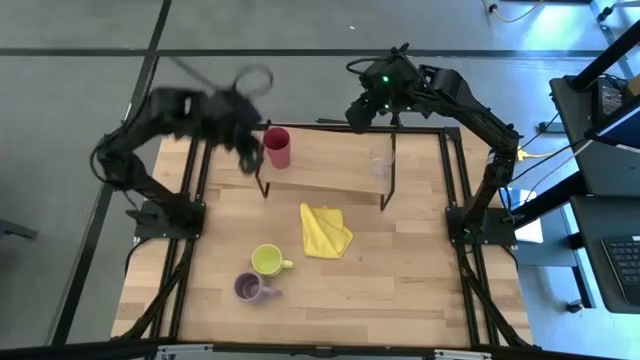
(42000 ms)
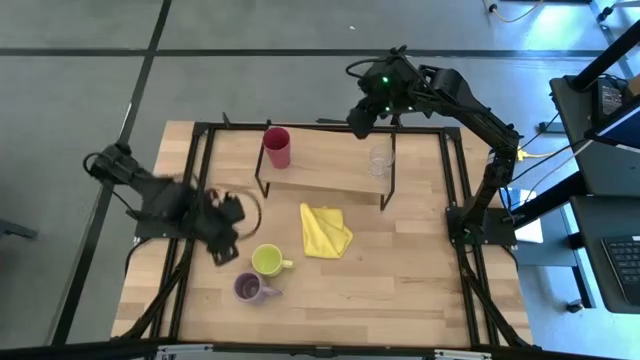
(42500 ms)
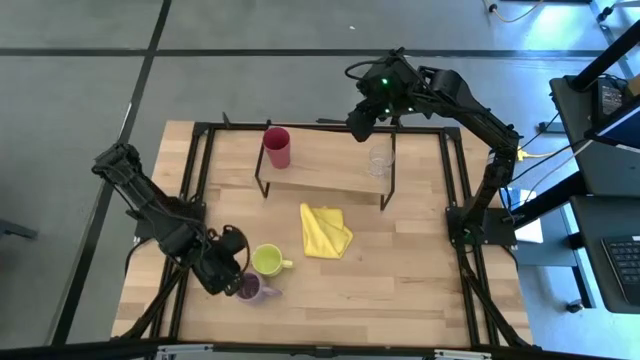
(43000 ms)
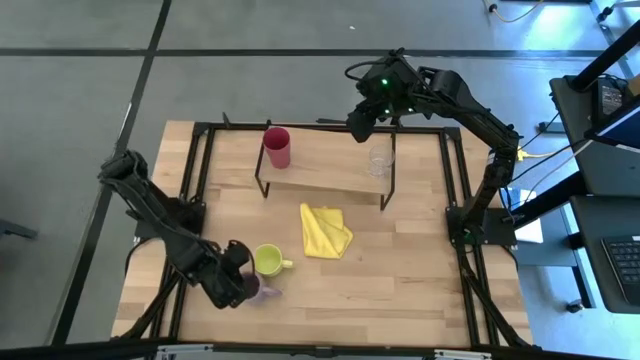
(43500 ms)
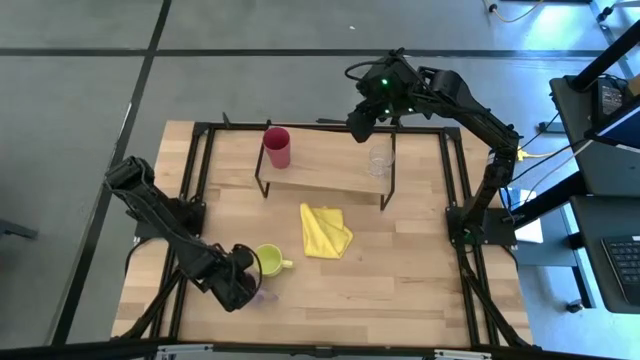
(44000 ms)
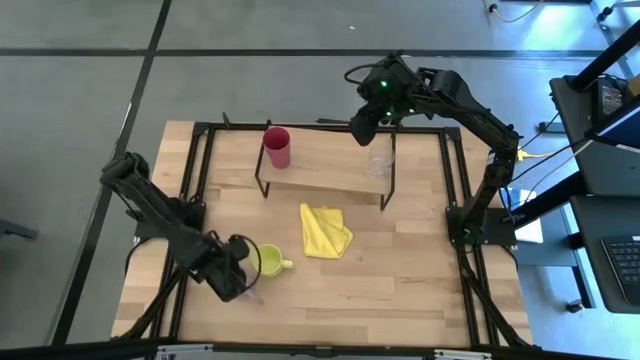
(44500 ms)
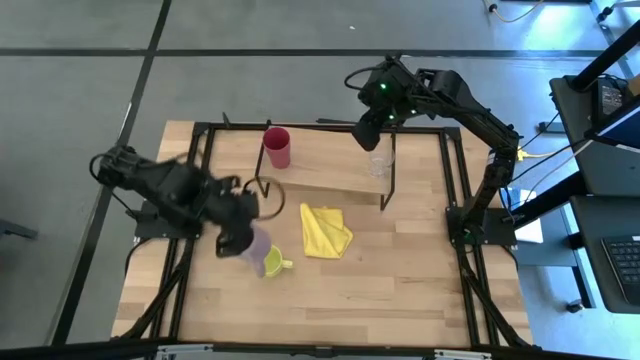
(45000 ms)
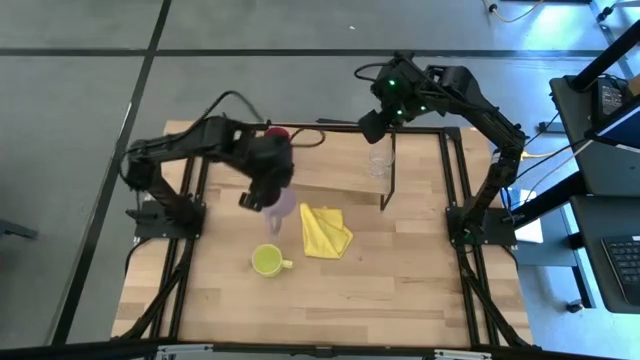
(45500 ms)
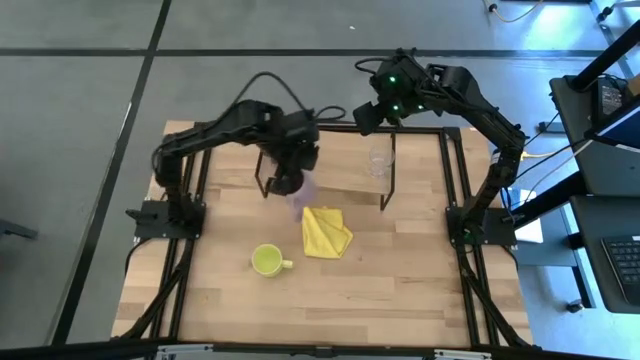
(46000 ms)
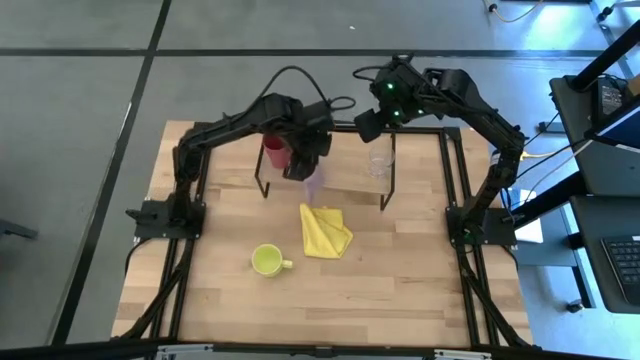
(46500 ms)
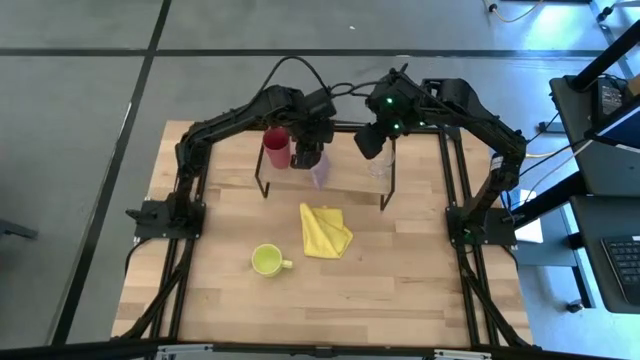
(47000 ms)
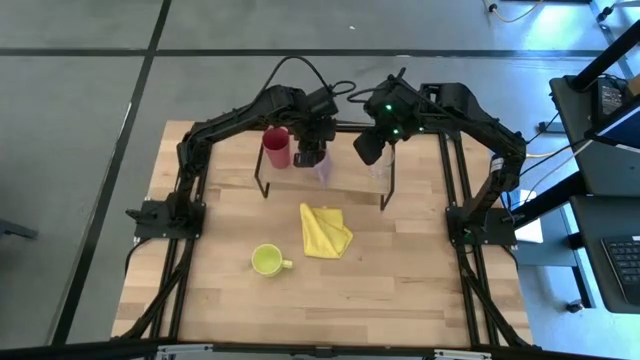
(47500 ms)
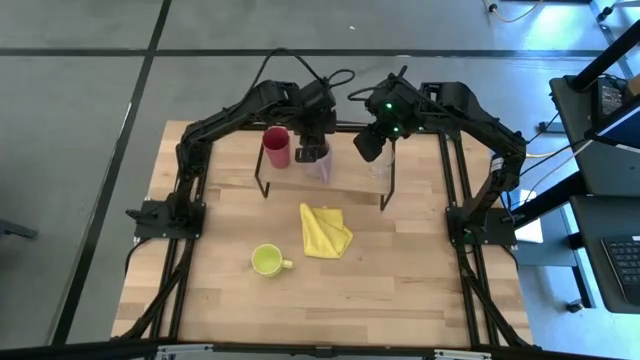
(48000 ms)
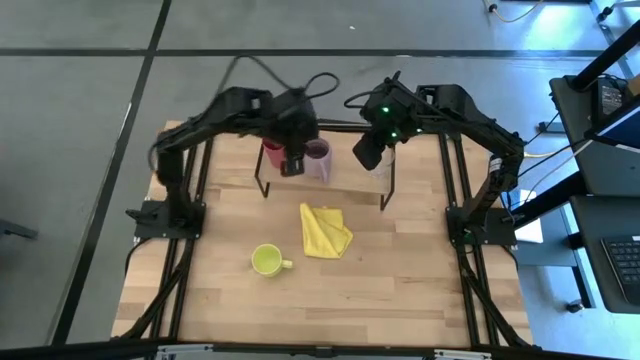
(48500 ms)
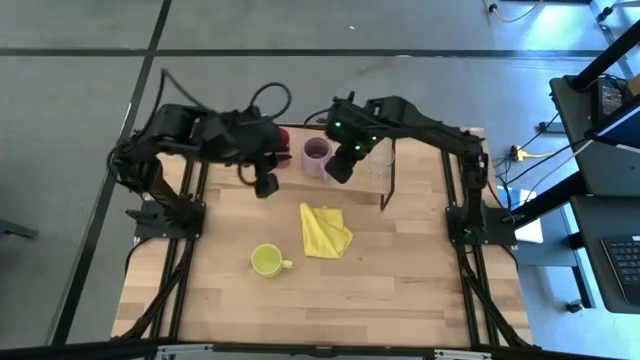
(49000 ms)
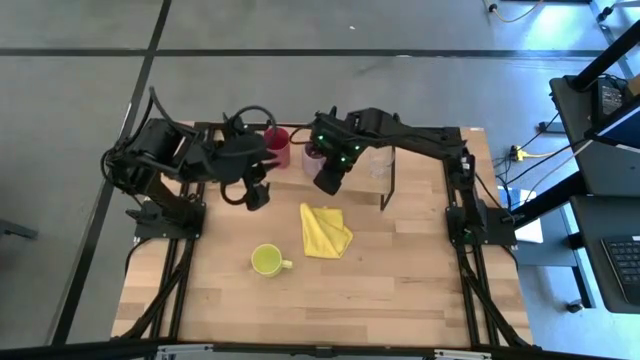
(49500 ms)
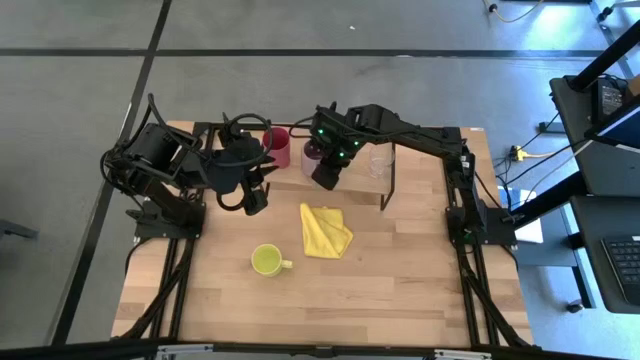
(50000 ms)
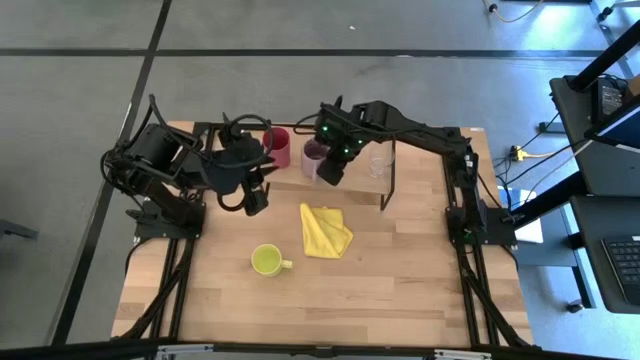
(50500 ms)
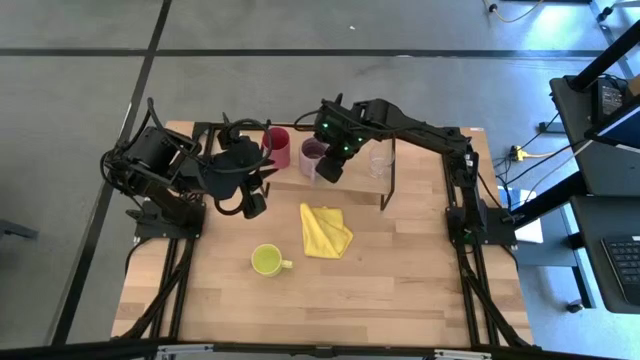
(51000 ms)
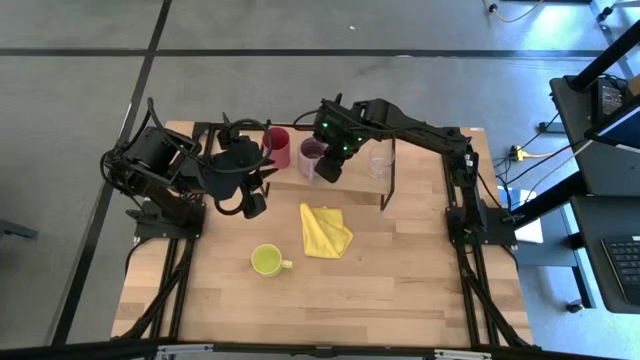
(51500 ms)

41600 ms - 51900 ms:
Task: Stack small to large cups/mugs on shelf
Put the purple mug near the pink cup on the shelf

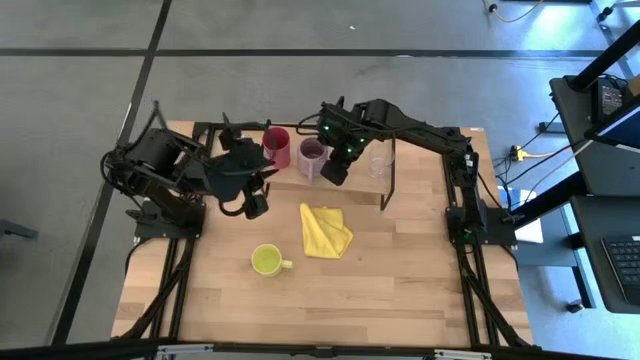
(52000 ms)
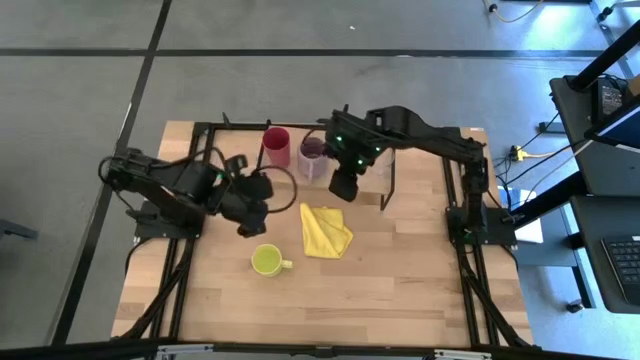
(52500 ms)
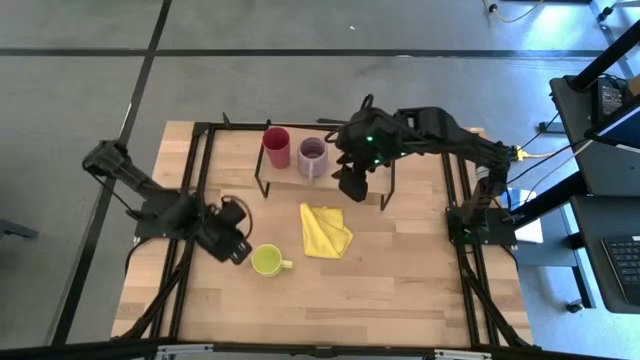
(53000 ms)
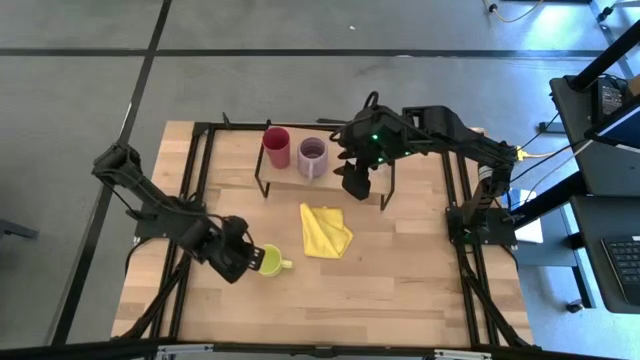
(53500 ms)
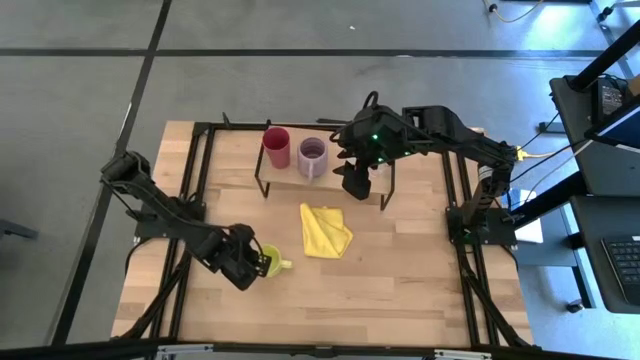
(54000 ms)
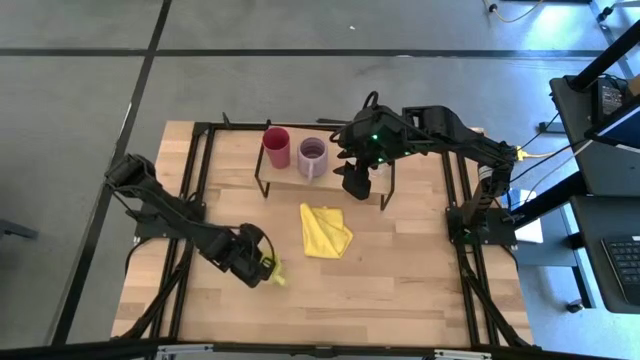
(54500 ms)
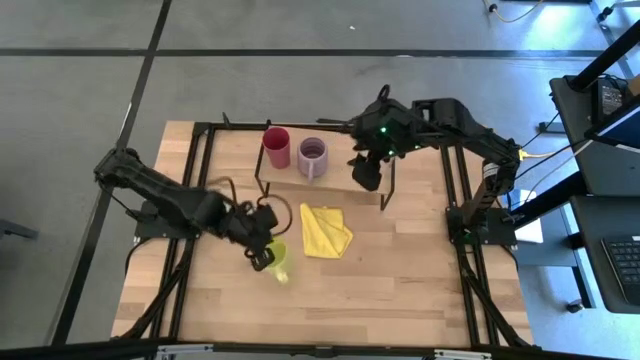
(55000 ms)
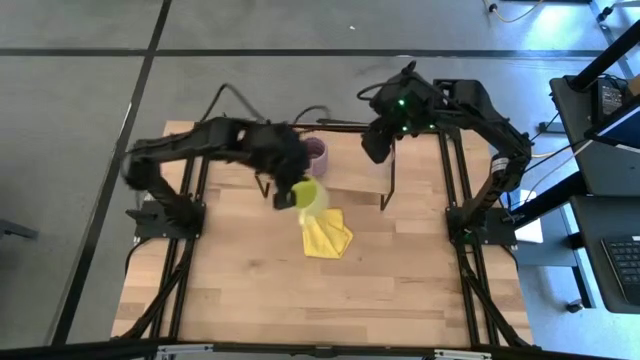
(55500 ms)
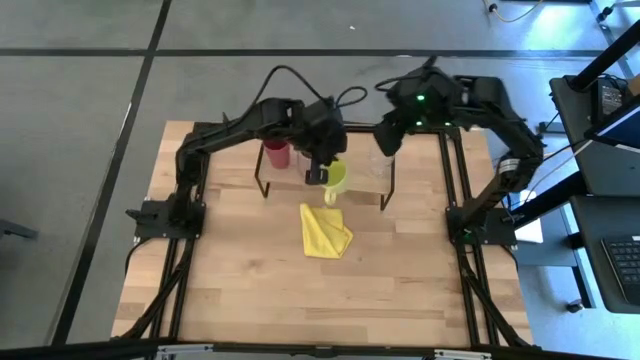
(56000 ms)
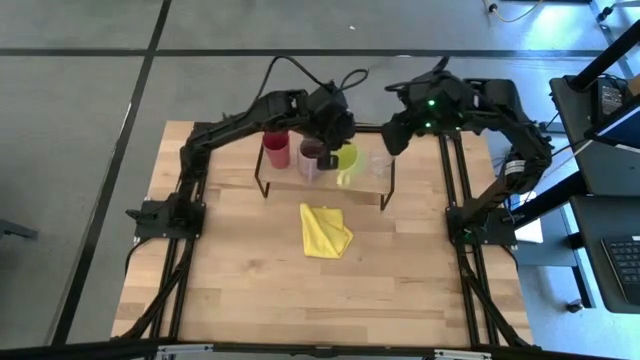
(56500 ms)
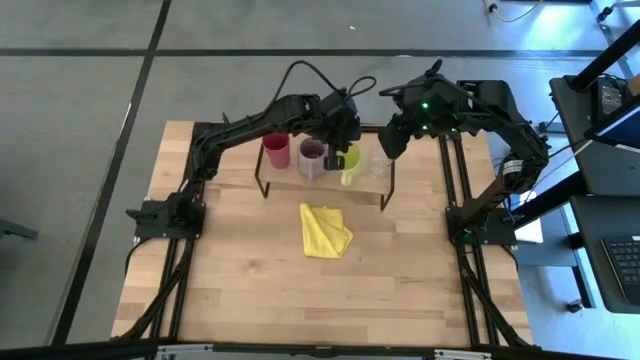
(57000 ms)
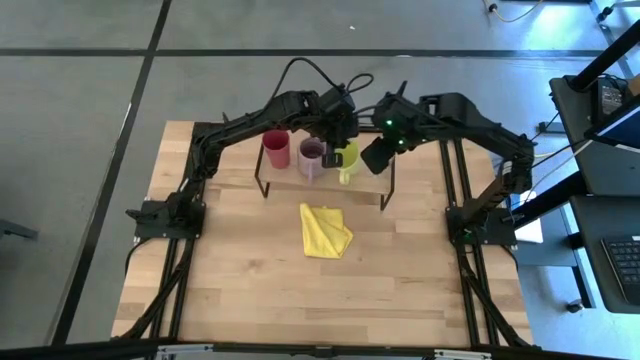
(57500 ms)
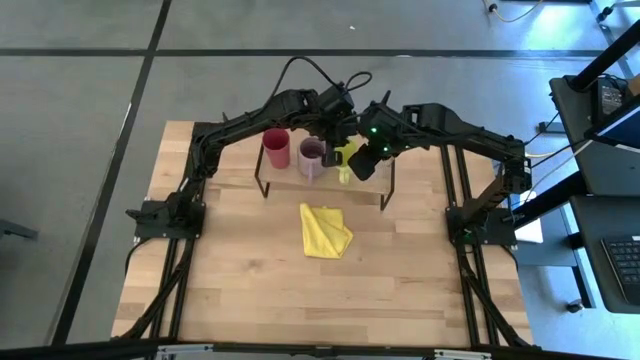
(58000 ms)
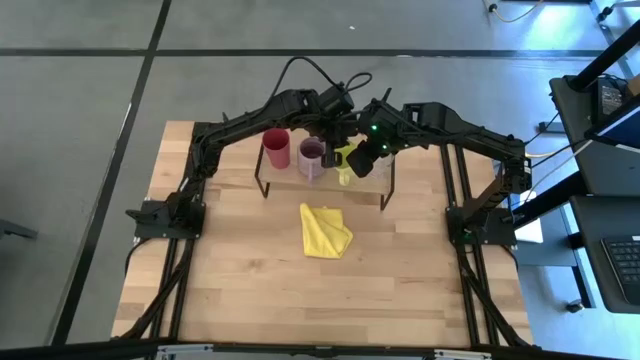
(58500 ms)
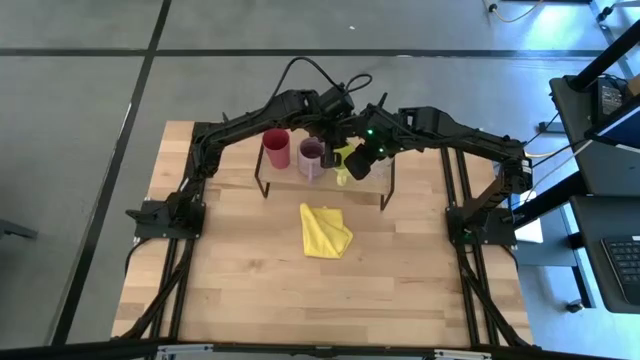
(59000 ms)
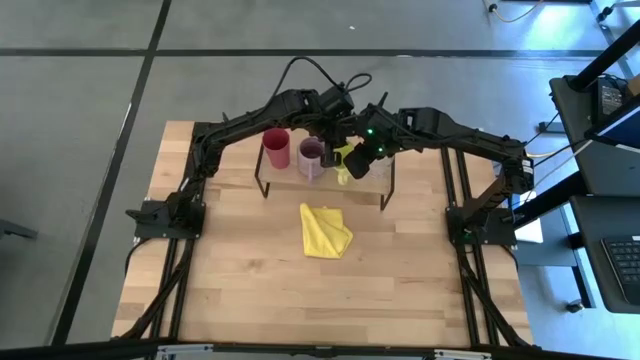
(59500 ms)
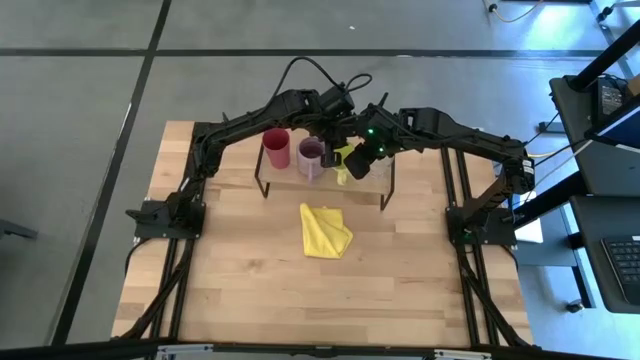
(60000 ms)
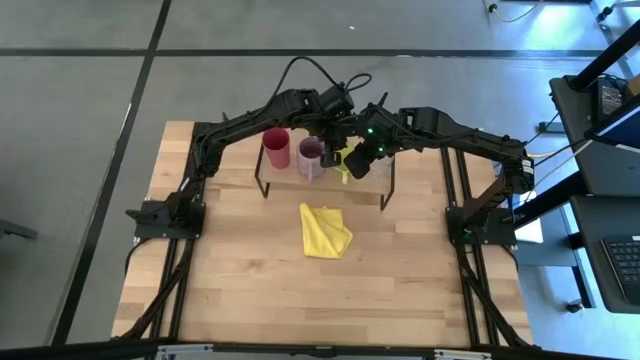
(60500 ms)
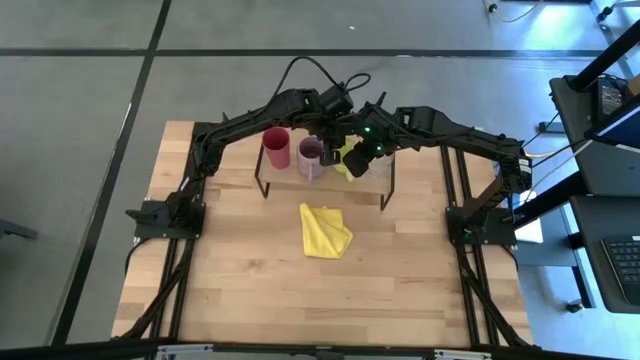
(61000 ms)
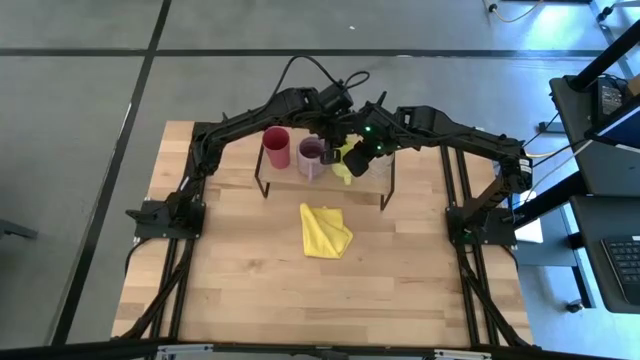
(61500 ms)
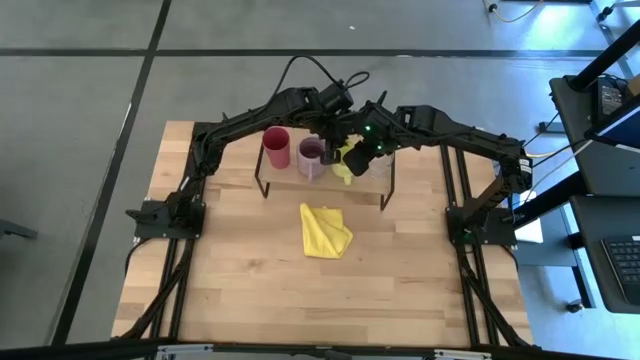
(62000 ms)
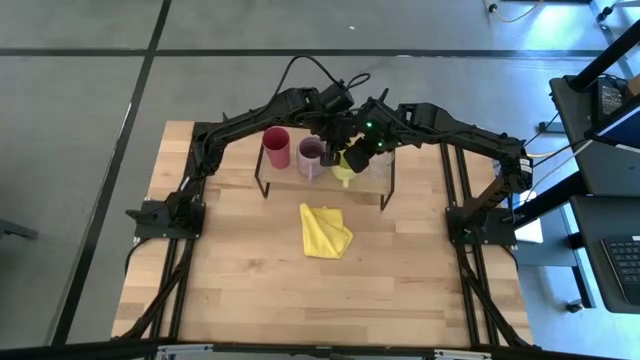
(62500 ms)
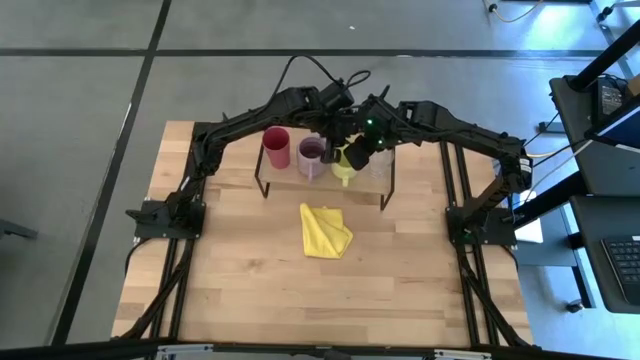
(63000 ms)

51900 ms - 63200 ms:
Put the yellow mug near the purple mug on the shelf

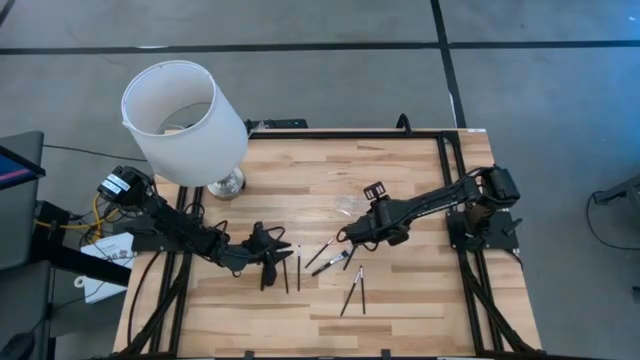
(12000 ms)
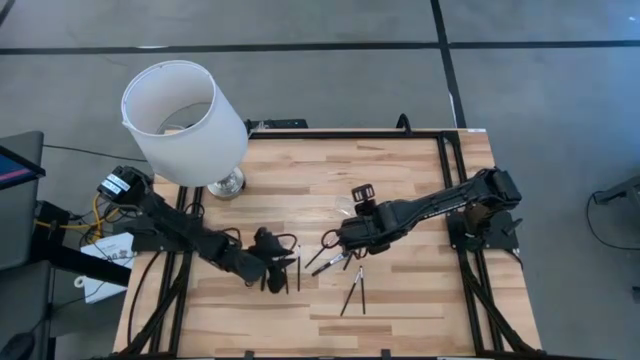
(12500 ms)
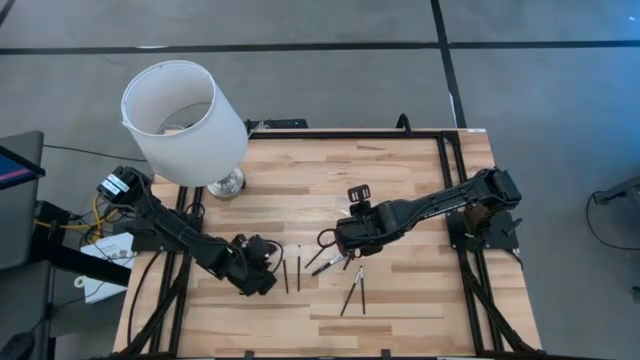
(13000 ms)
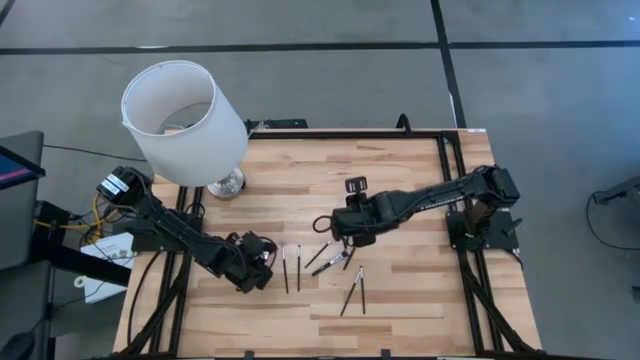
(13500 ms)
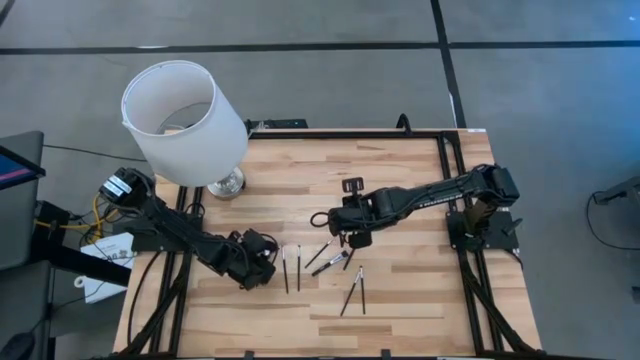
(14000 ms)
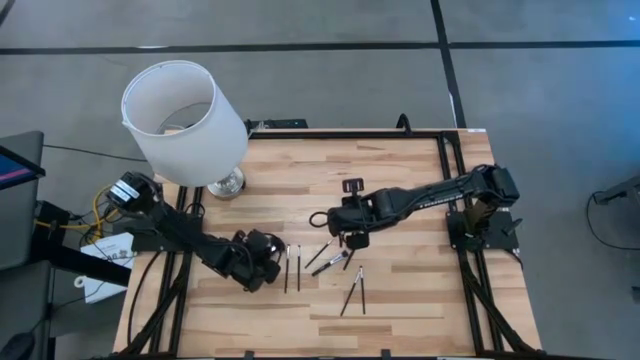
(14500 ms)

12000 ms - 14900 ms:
Task: Put items in baskets/containers
Put the black highlighter brush into the transparent organizer
